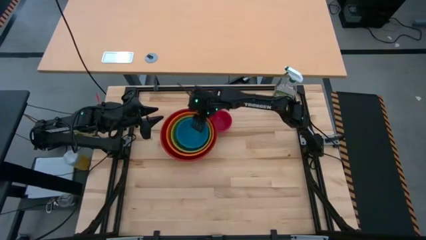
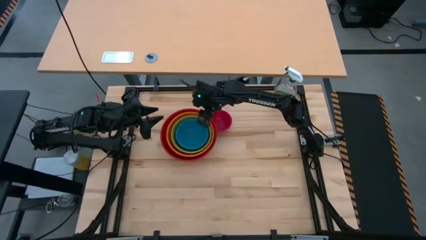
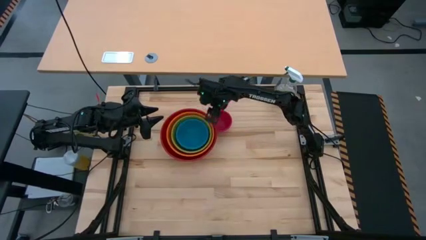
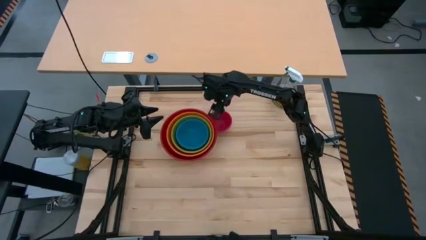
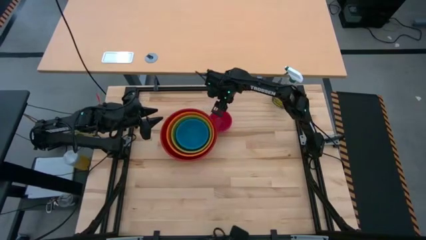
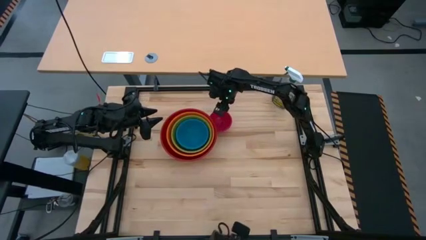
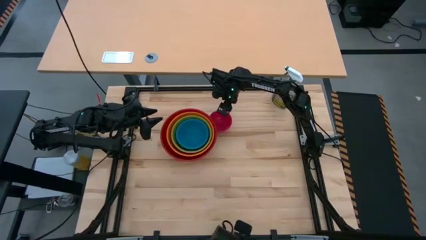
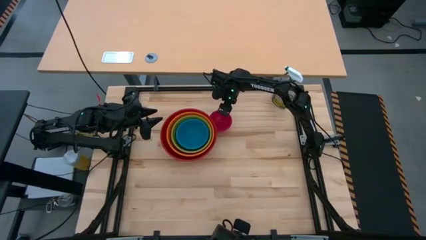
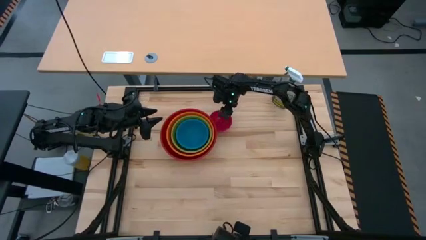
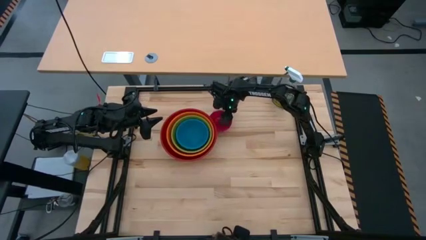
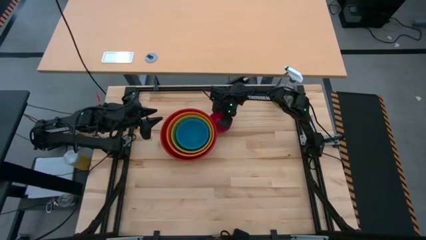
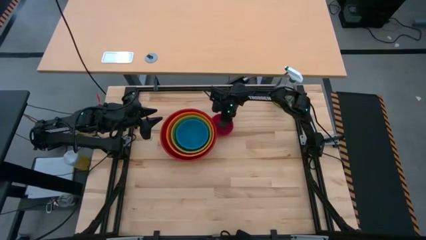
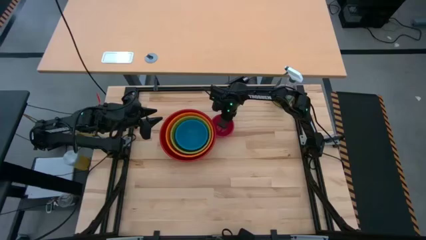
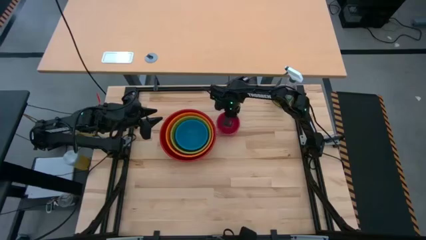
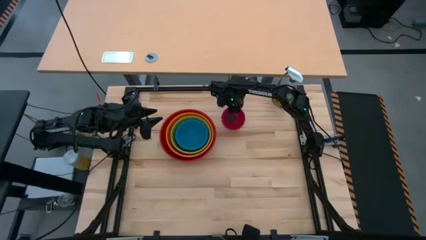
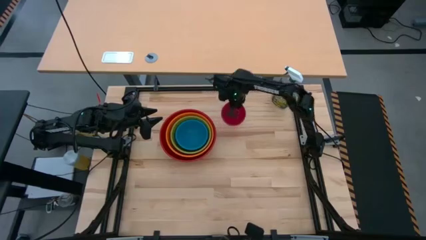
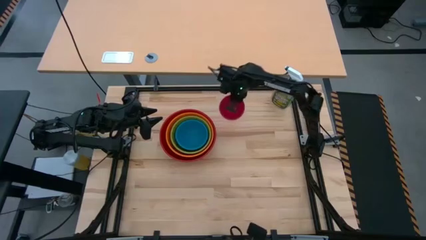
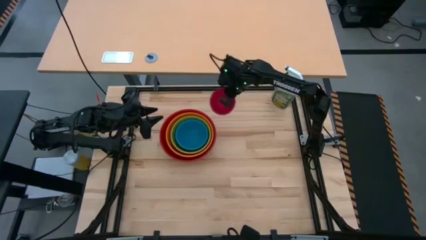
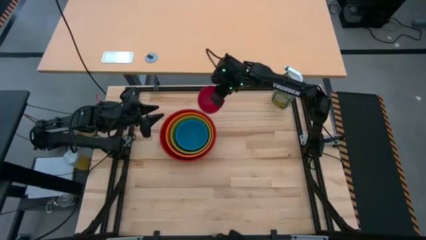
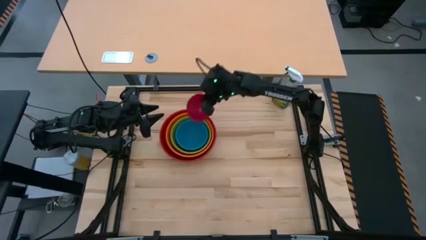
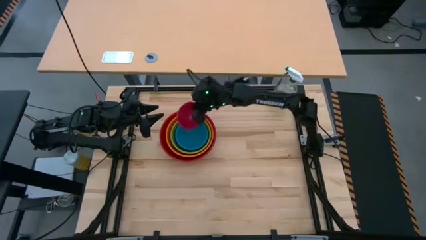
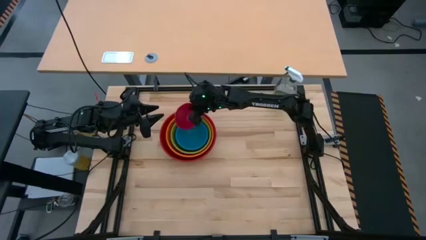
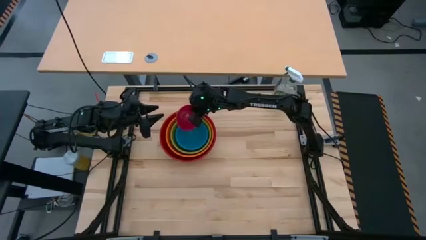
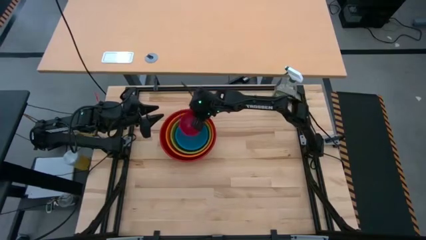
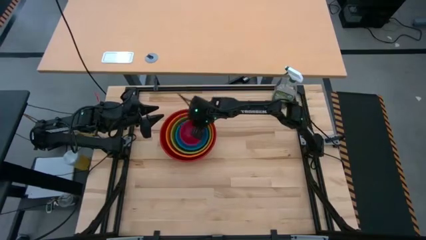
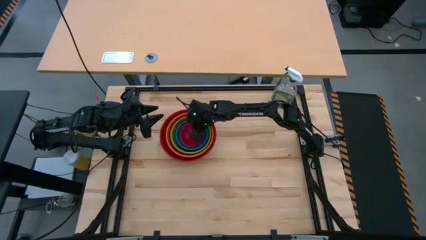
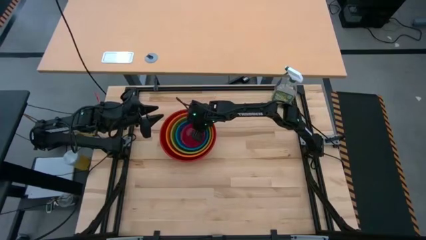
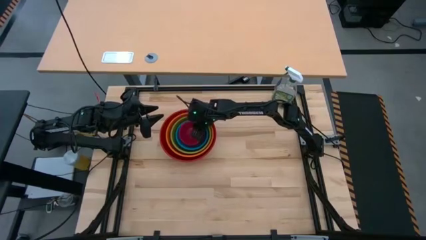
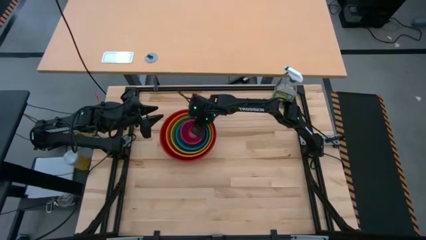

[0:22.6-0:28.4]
Stack the pink bowl on top of the blue bowl

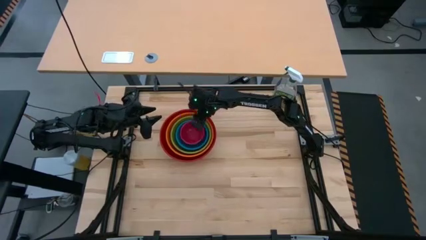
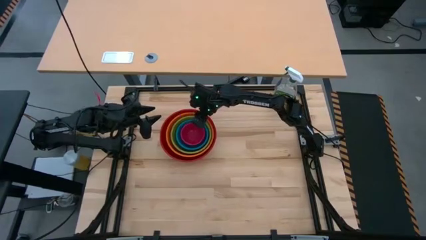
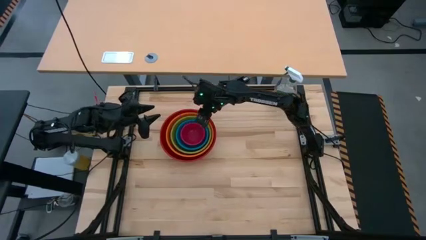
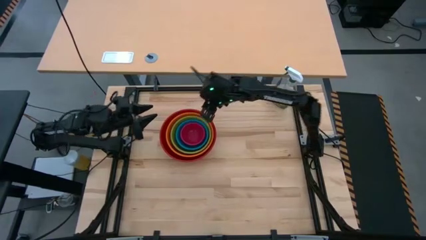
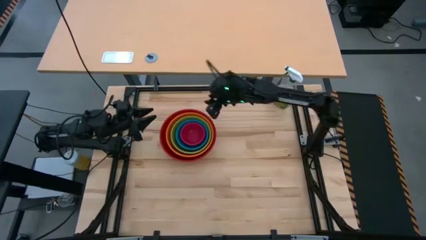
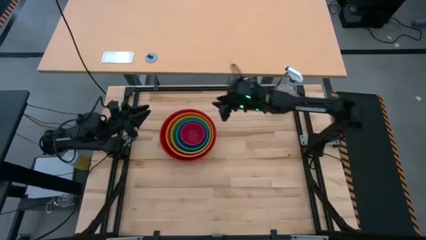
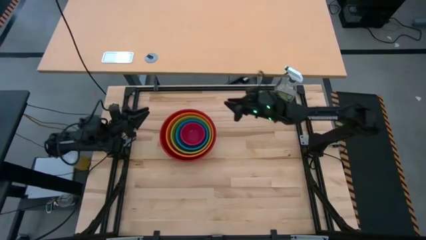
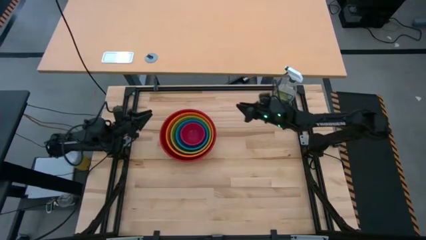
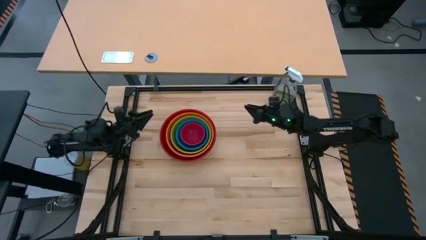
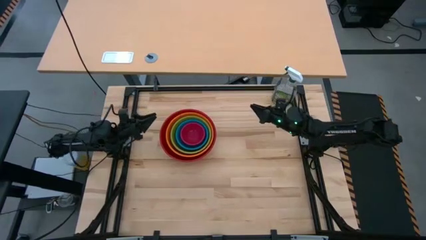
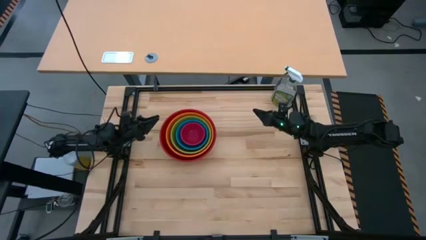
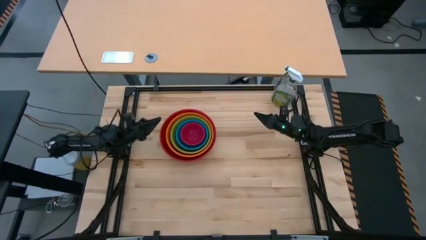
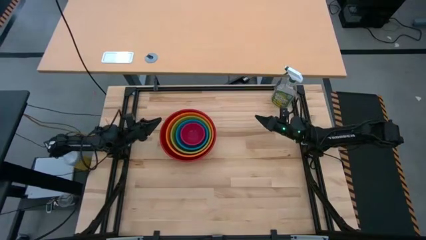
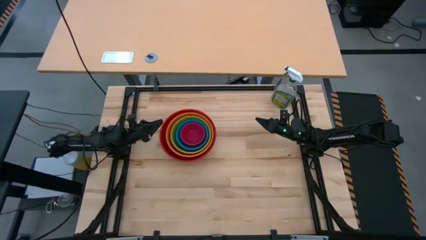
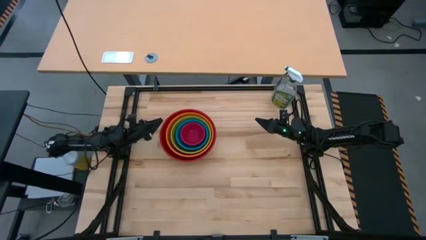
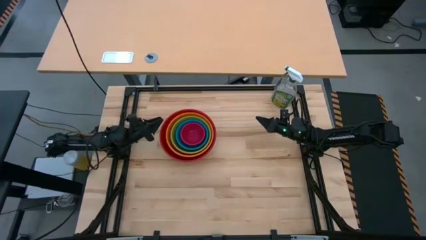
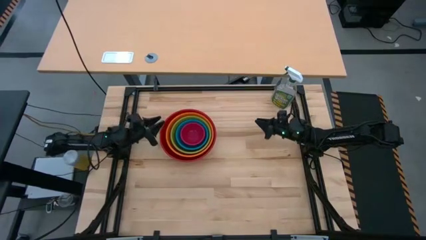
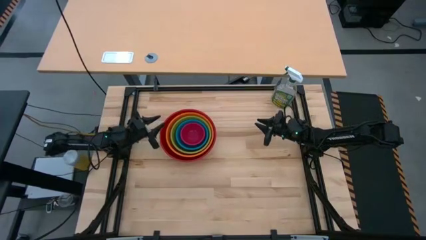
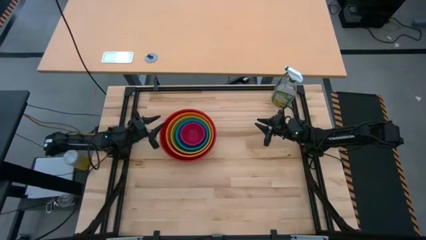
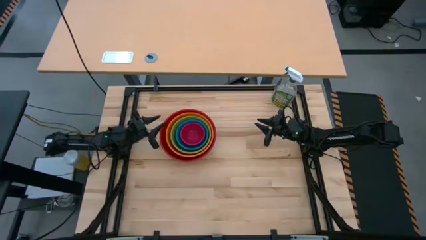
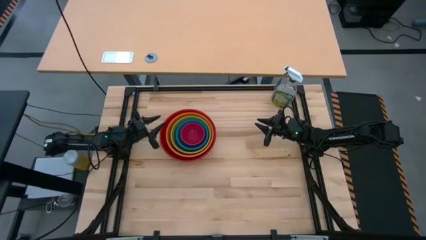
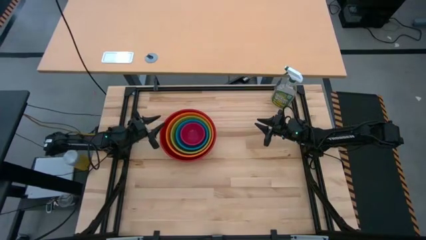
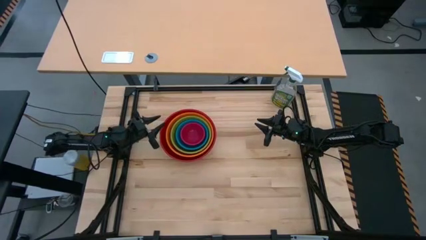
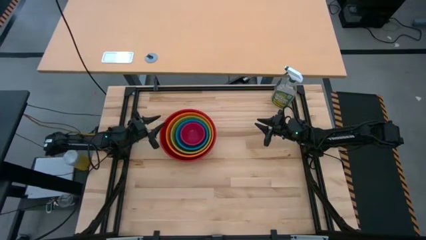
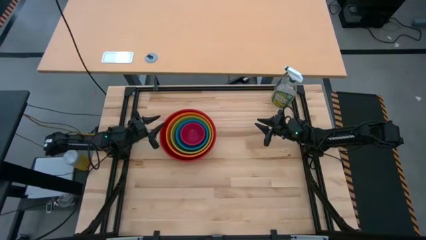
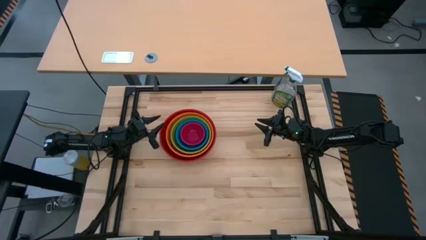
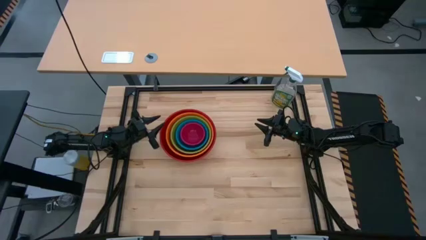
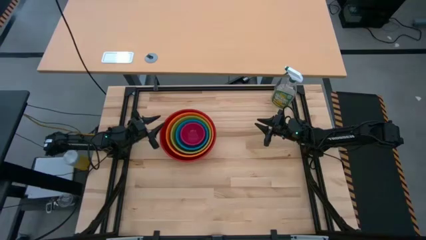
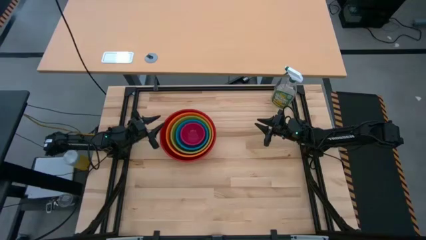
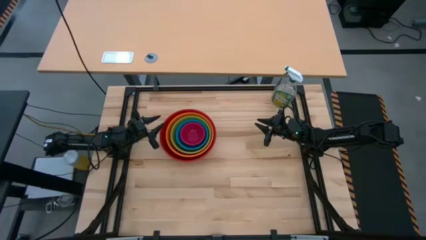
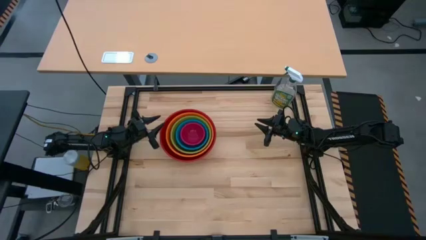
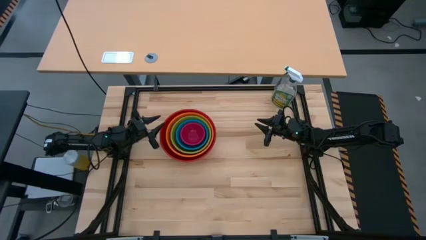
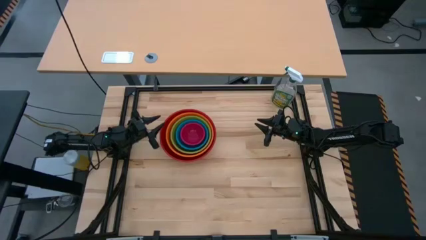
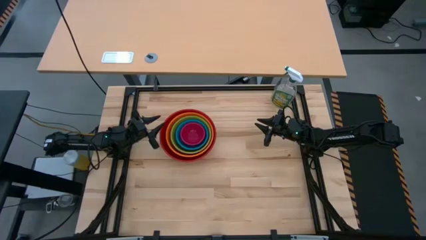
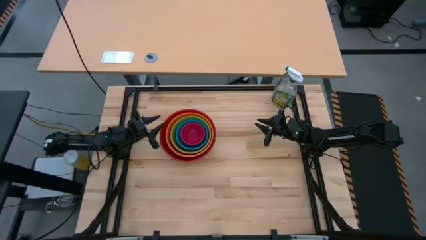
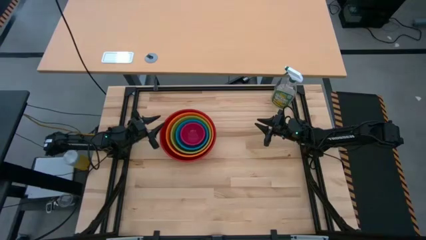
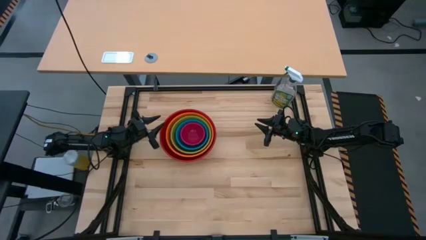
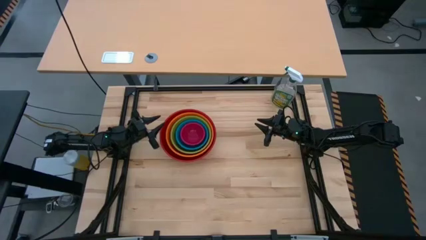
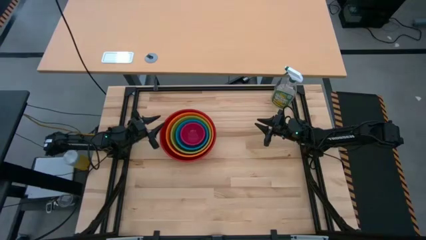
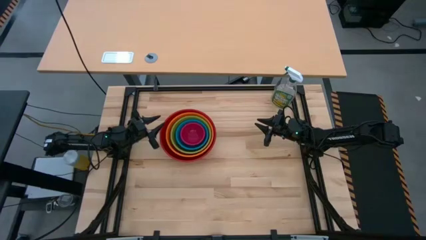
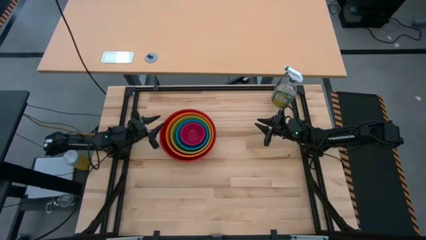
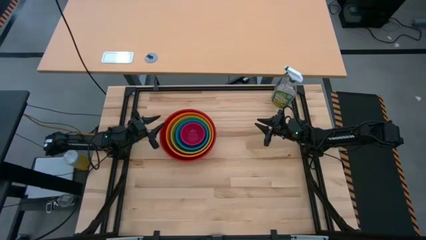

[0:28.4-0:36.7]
Return to Home Position
